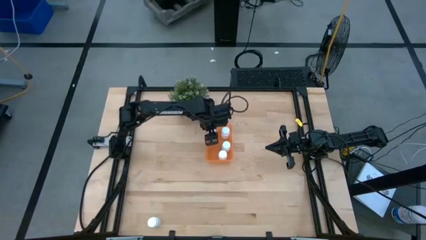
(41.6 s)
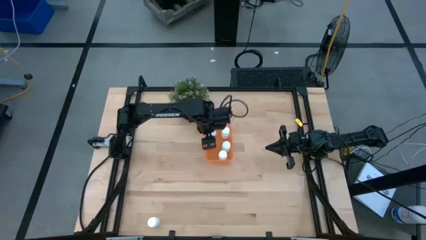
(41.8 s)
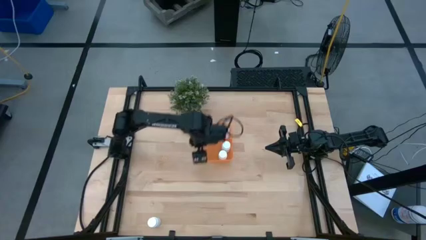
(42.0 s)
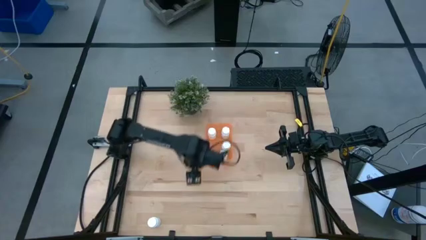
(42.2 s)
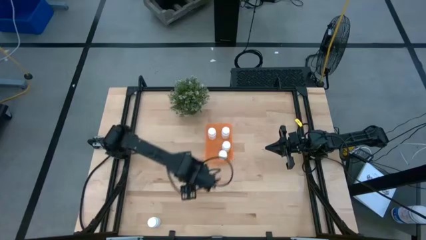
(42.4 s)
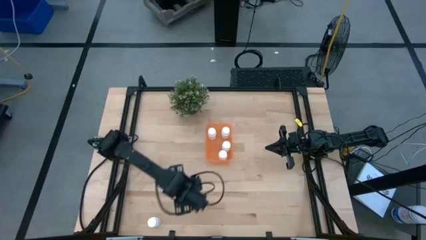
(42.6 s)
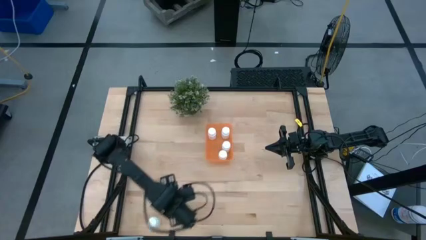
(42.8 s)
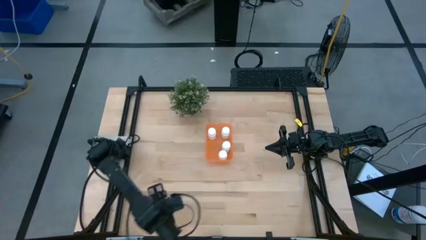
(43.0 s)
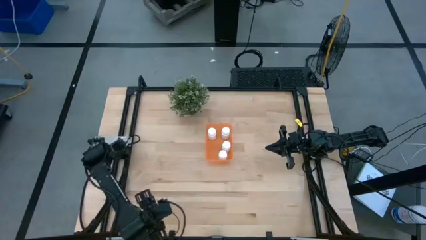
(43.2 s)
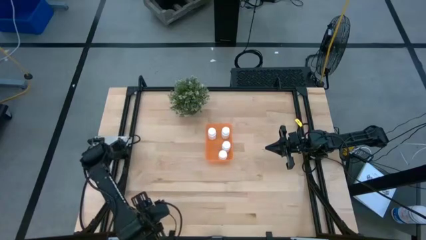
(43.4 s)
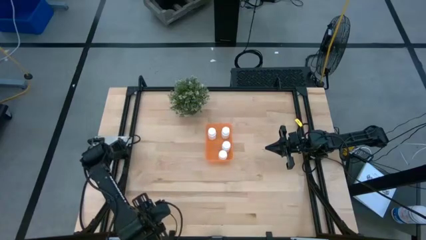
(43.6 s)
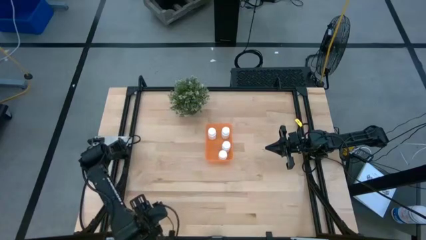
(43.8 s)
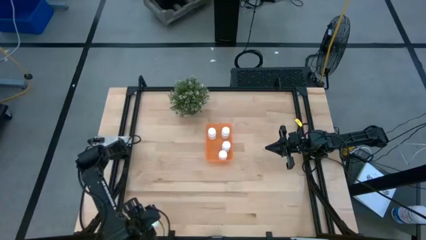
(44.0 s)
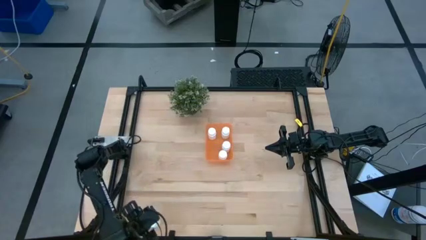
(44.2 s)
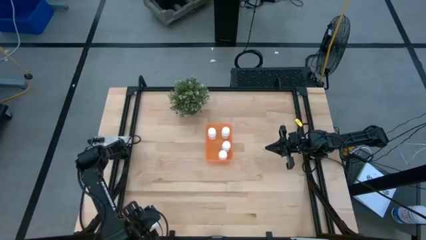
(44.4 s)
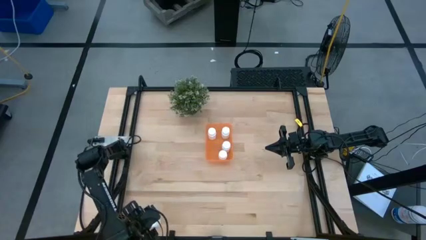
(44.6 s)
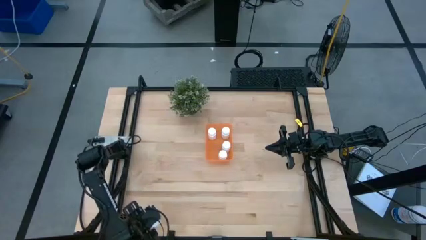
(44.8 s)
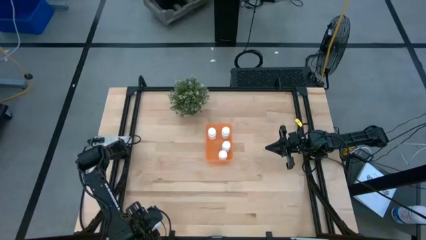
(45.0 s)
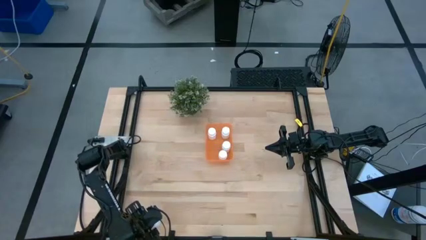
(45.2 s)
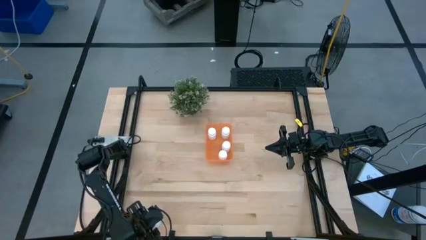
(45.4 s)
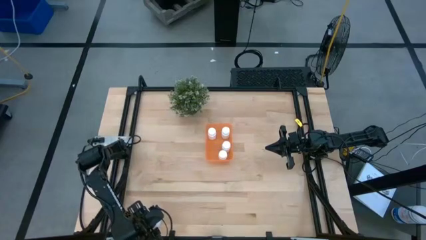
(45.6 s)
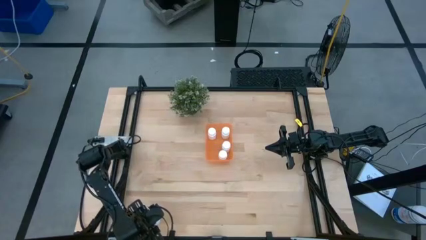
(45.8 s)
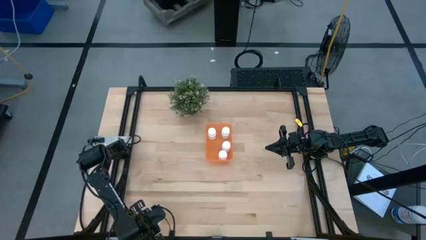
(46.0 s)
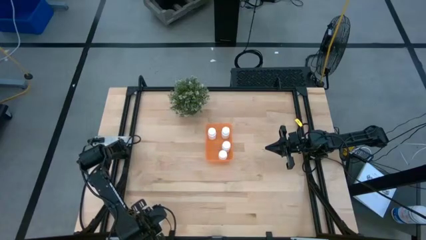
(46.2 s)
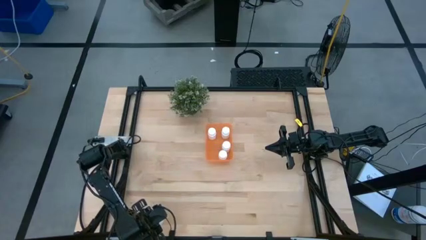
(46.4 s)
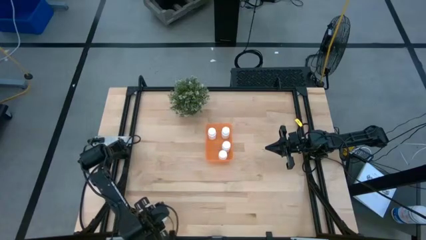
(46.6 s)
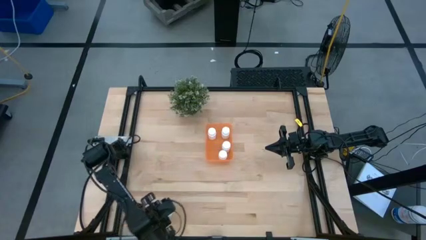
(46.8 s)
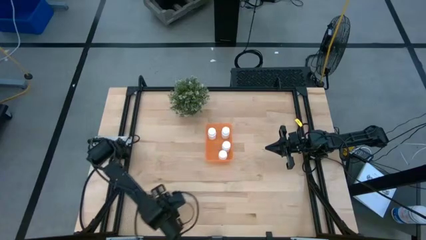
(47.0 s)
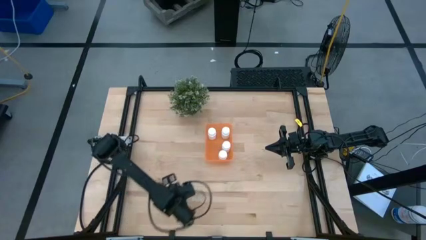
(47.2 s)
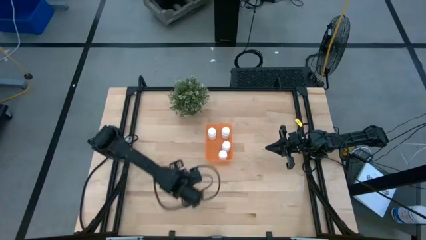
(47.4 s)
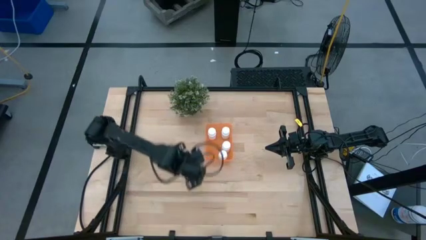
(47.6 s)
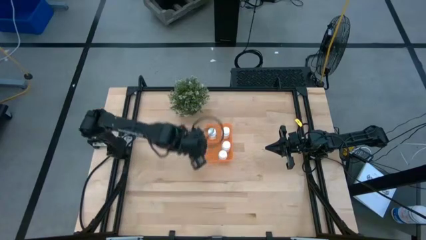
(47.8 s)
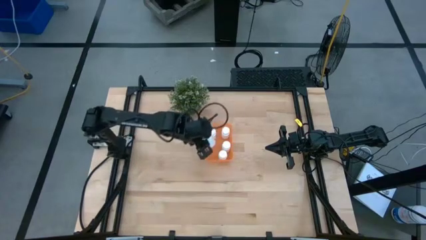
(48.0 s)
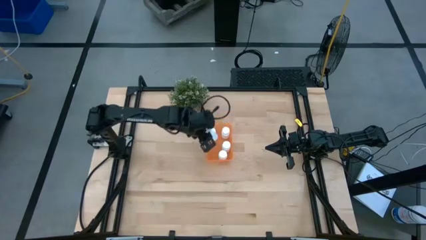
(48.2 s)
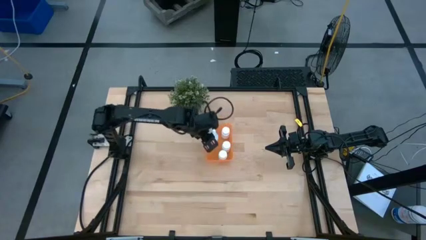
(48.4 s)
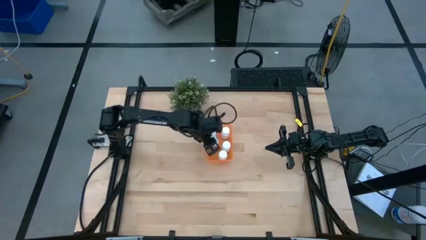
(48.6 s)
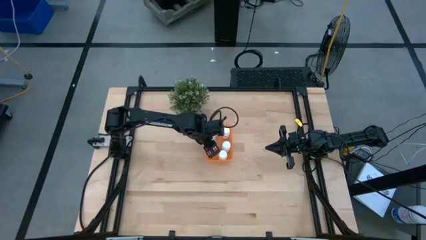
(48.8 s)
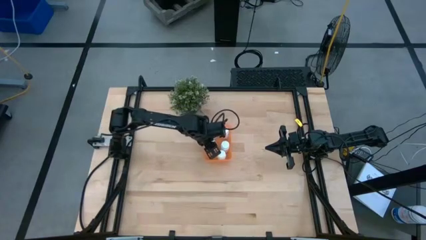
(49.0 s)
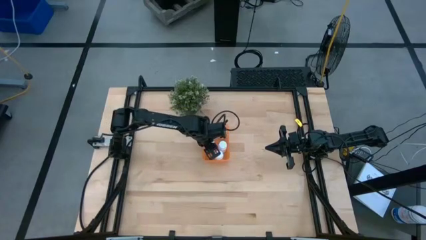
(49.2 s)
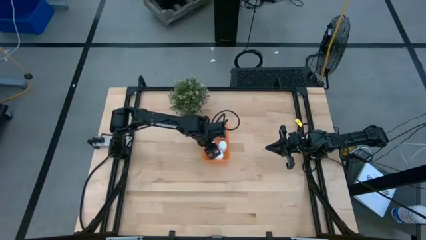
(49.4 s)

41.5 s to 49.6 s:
Task: Pick and place pill bottles into a basket
Put the white medicine bottle into the orange bin

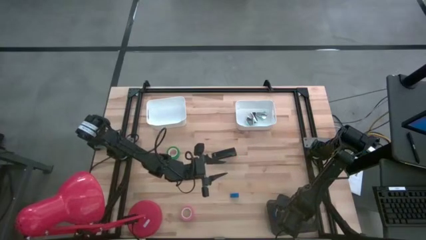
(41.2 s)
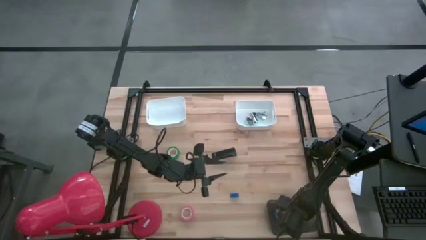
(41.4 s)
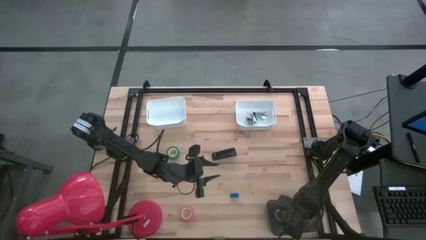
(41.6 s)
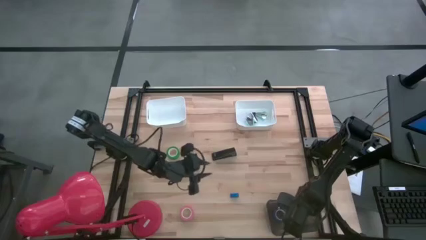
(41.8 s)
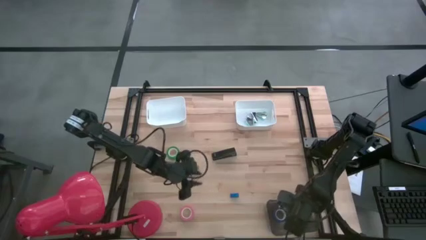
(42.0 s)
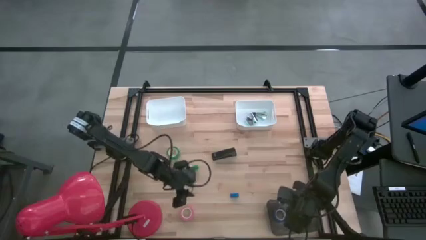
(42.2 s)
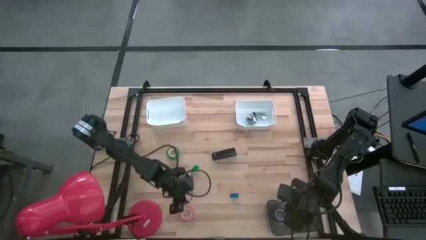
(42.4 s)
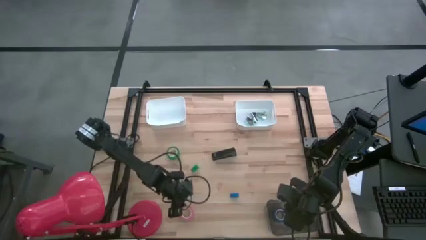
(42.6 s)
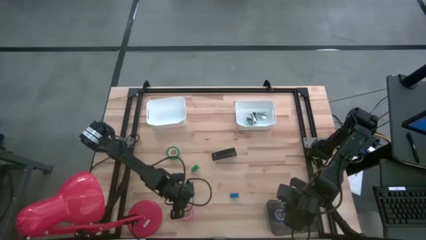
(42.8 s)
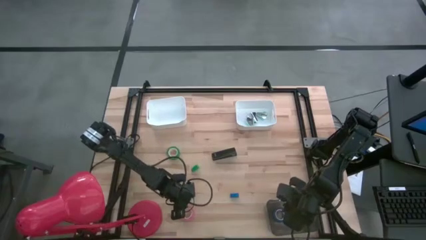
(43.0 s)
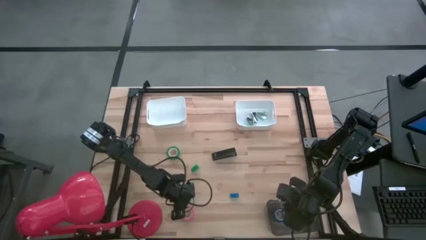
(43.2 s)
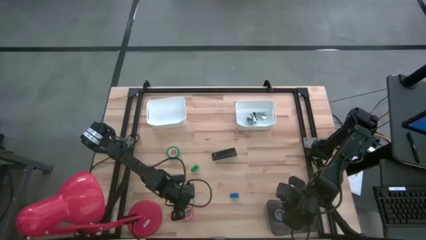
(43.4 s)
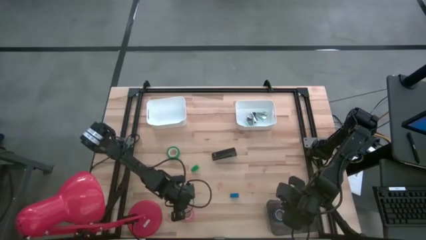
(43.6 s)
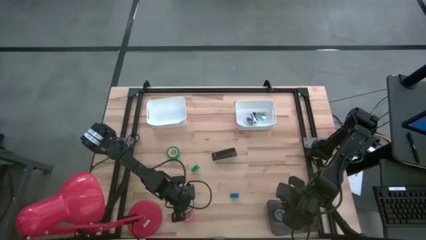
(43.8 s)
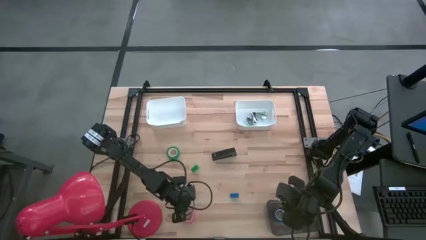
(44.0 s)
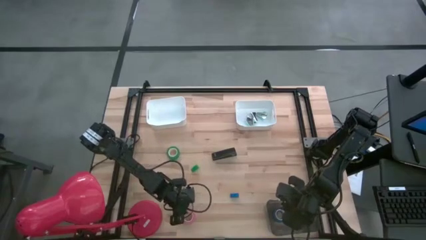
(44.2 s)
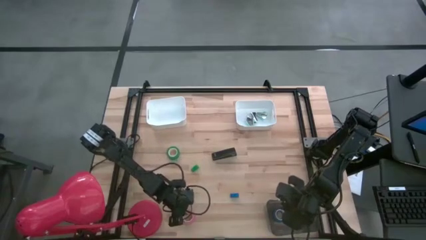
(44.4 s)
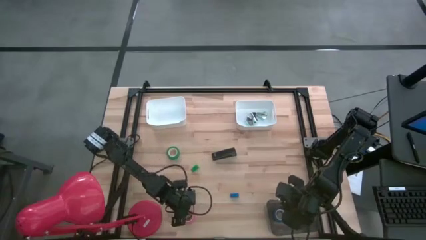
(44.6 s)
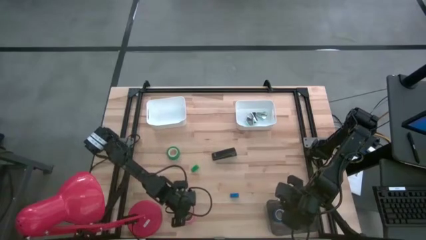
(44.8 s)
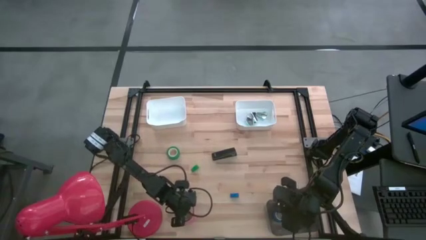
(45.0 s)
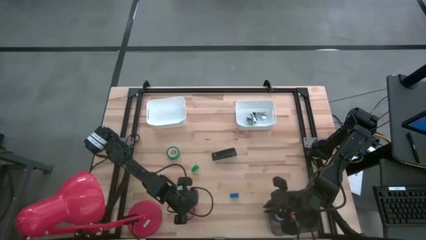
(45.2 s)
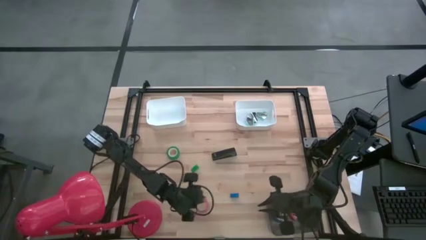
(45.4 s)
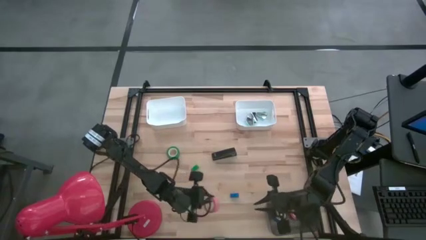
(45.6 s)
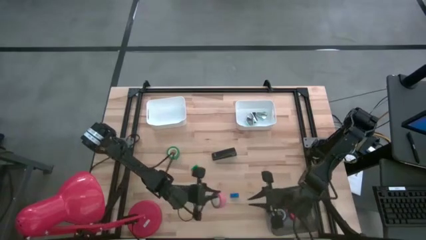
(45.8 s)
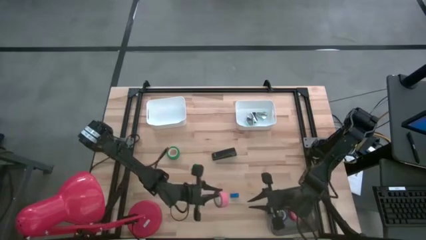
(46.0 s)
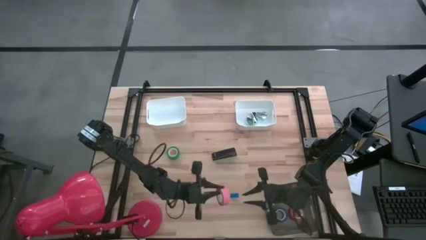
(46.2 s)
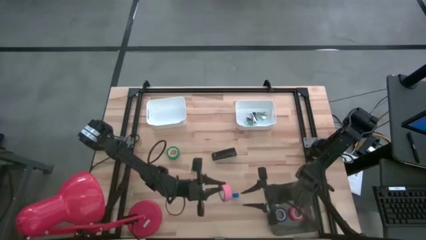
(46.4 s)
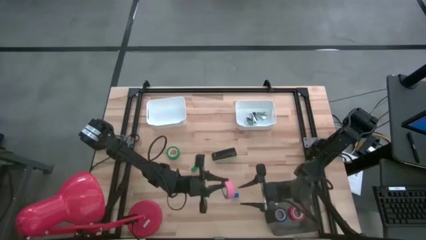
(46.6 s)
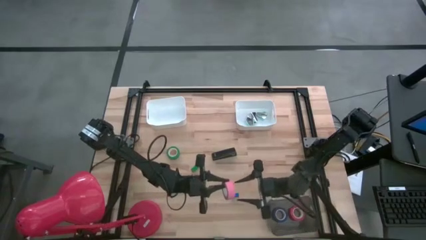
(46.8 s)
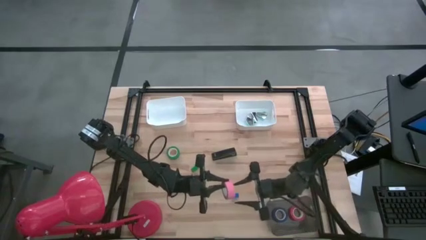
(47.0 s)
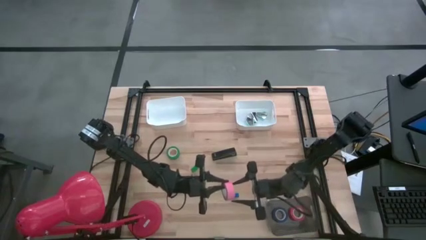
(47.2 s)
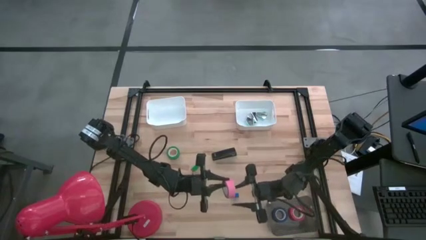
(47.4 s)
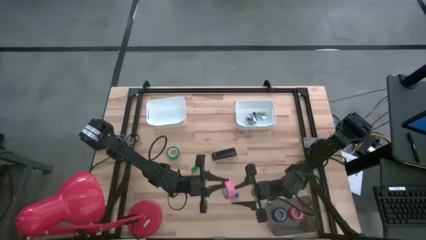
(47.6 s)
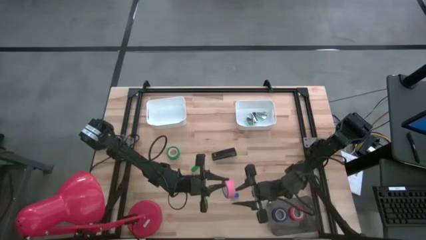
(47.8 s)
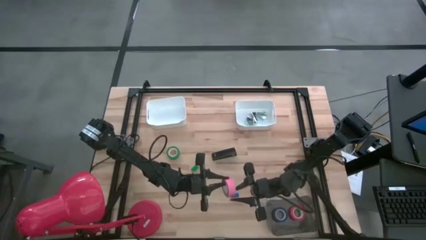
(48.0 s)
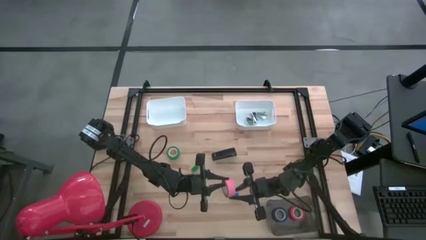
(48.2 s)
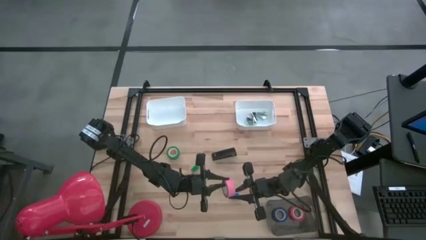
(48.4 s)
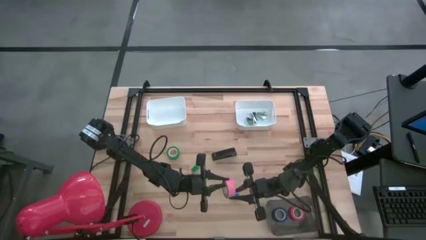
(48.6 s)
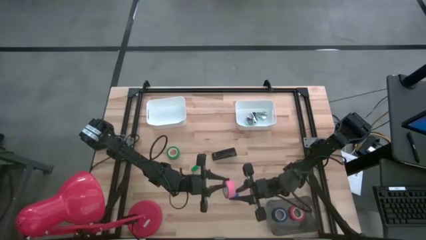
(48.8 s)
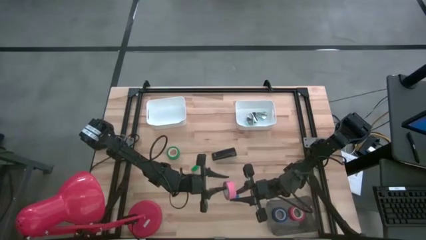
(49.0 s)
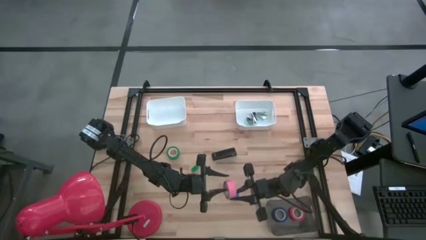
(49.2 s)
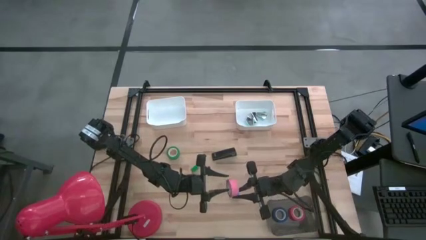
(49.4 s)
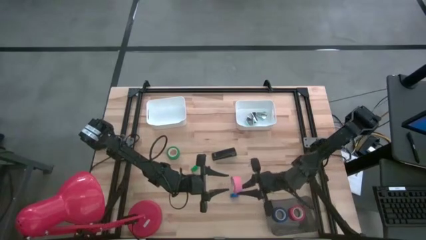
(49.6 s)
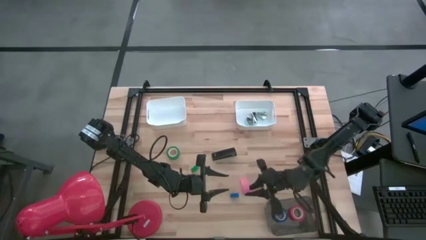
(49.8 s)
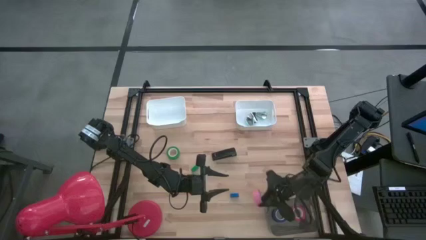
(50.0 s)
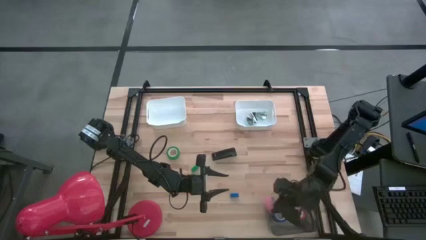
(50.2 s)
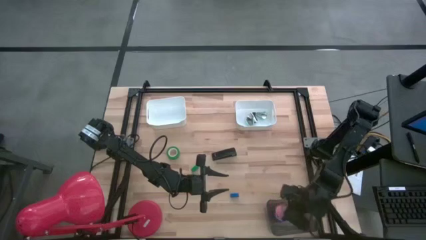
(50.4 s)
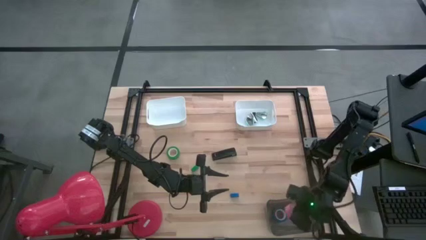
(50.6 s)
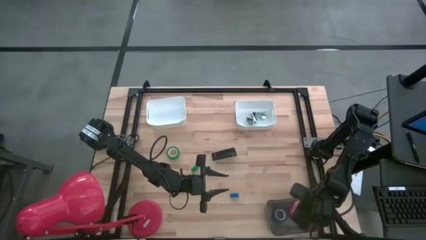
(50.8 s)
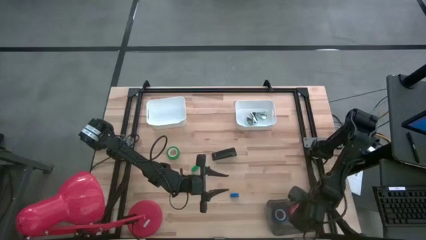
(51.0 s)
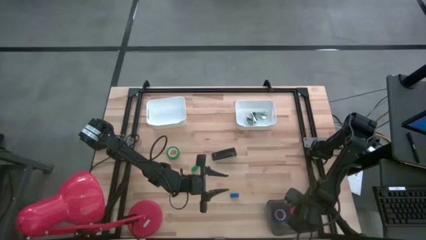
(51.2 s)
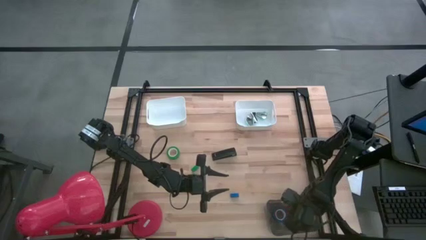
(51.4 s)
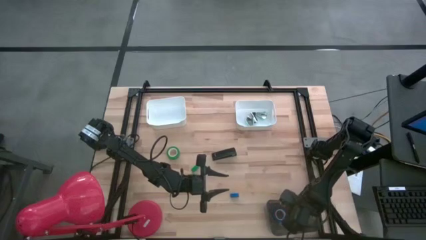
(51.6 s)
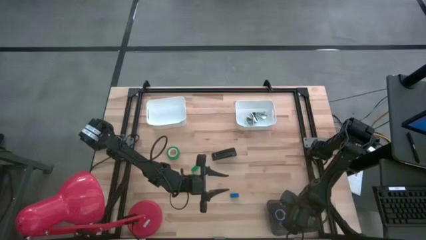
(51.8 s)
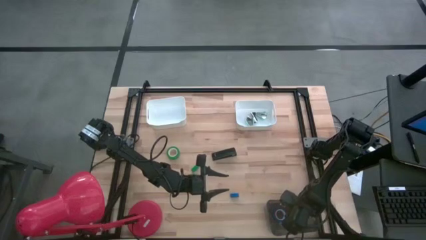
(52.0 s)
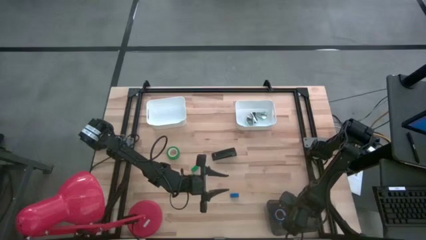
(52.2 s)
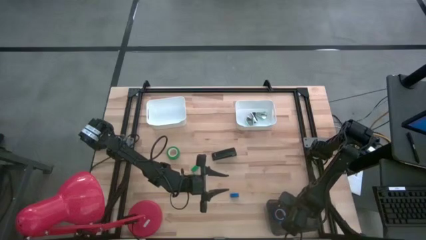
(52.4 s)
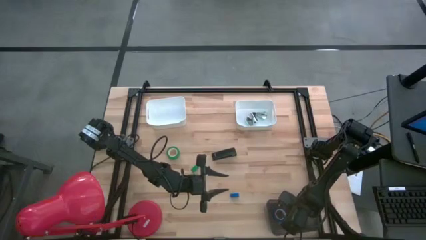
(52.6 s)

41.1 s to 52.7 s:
Task: Pick and place Stapler, Stapler remover, tape
Put the pink tape into the black bin
